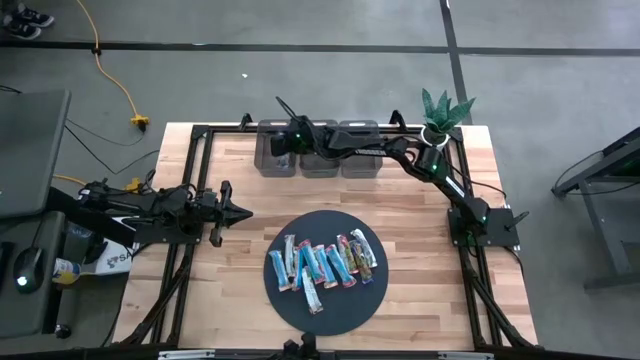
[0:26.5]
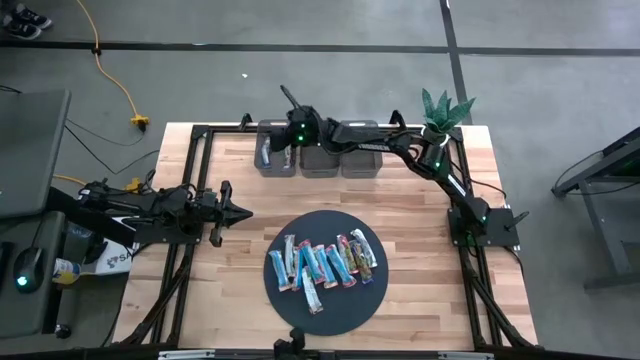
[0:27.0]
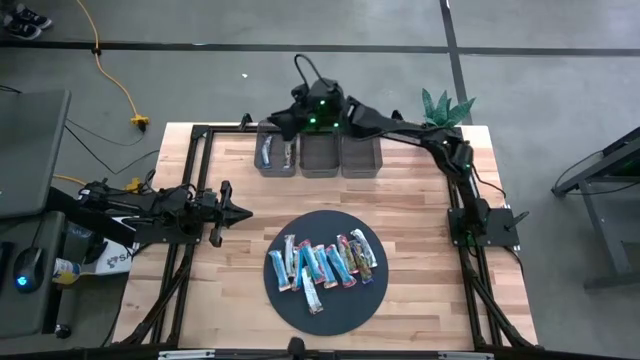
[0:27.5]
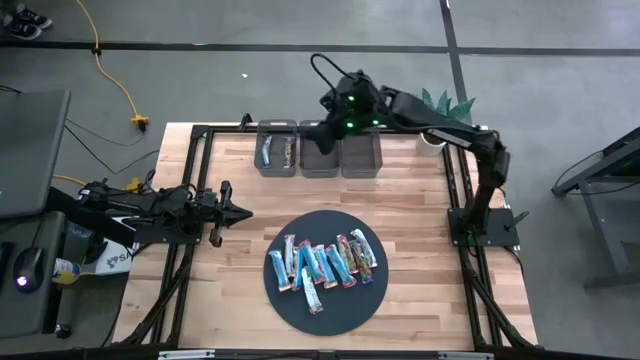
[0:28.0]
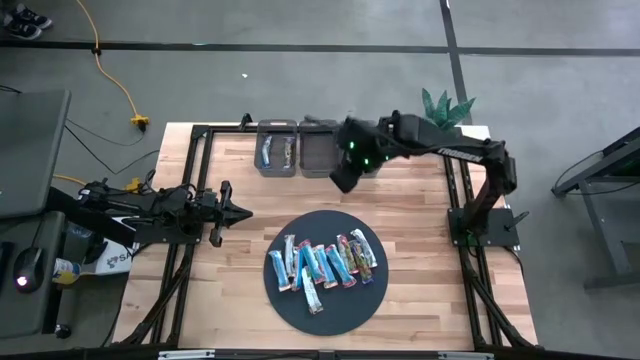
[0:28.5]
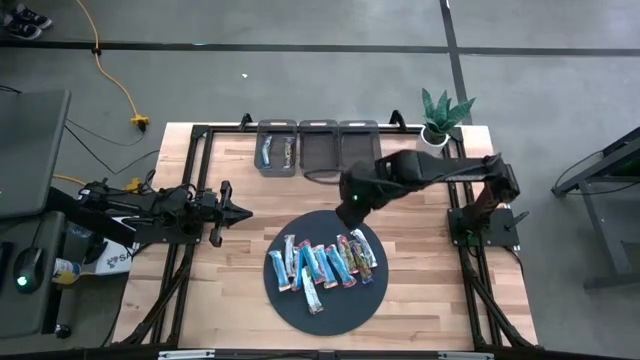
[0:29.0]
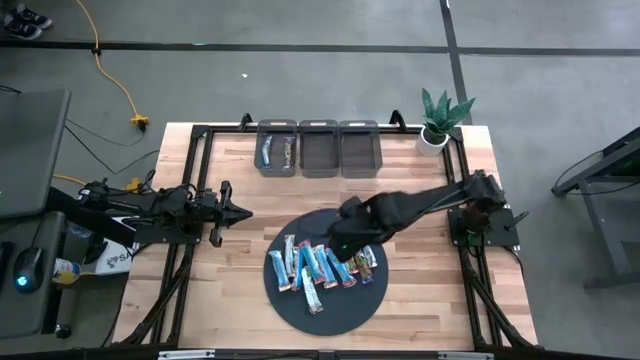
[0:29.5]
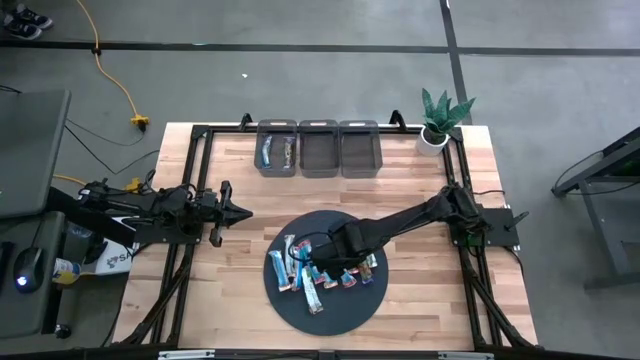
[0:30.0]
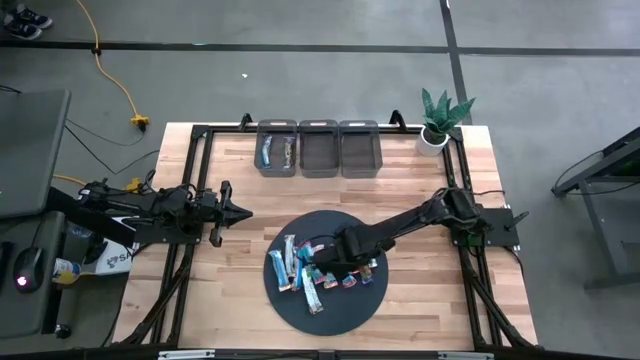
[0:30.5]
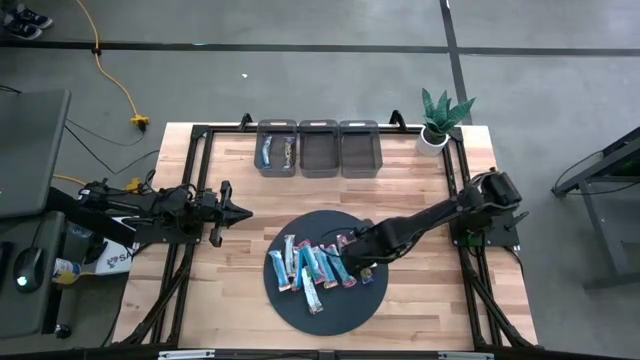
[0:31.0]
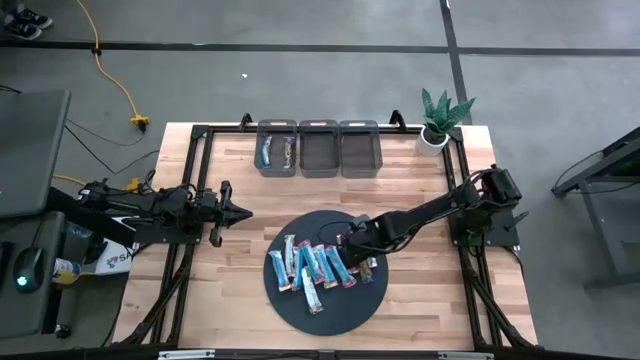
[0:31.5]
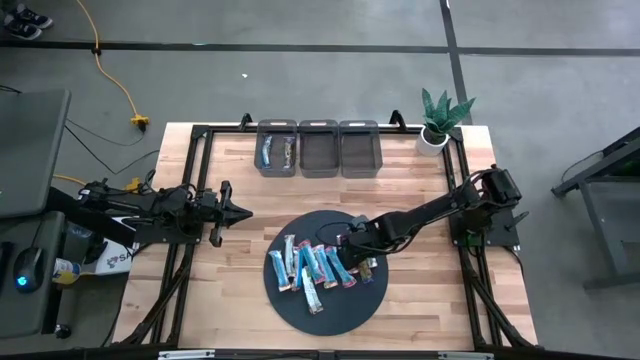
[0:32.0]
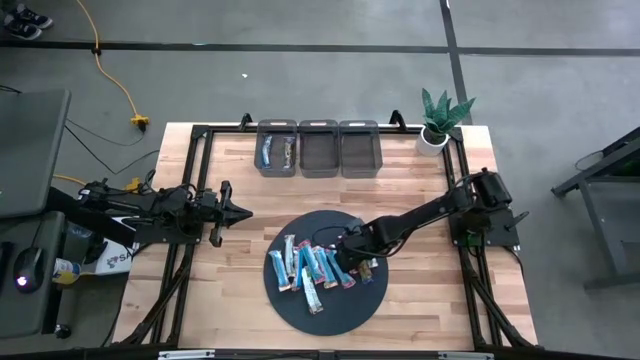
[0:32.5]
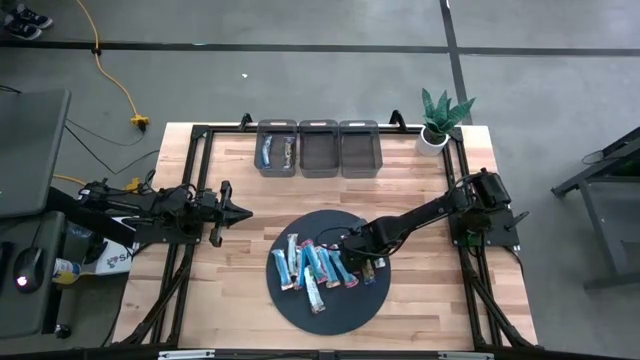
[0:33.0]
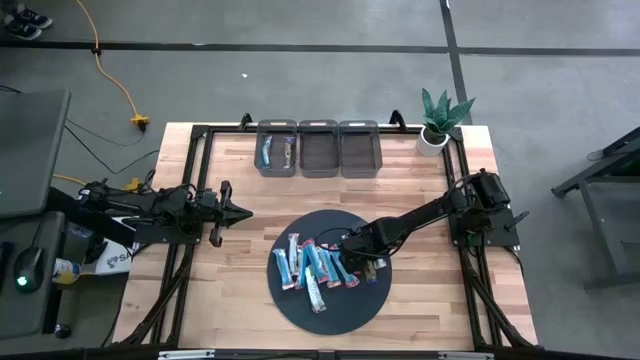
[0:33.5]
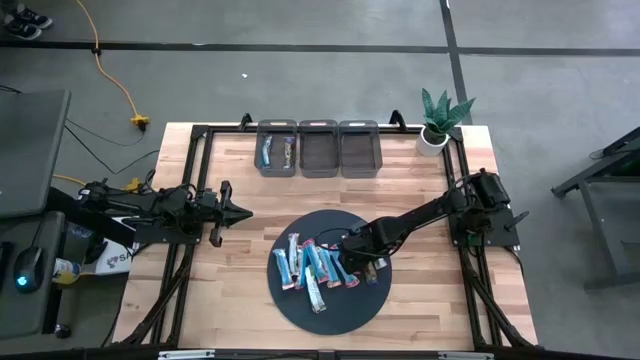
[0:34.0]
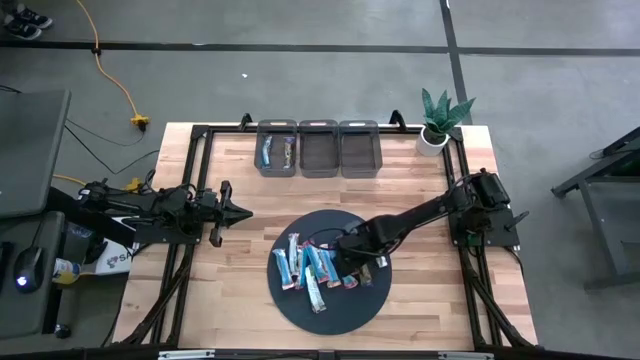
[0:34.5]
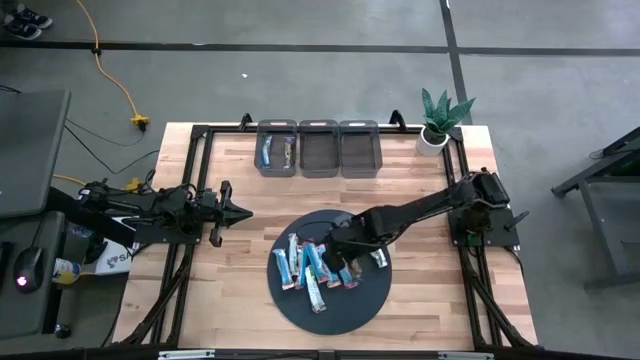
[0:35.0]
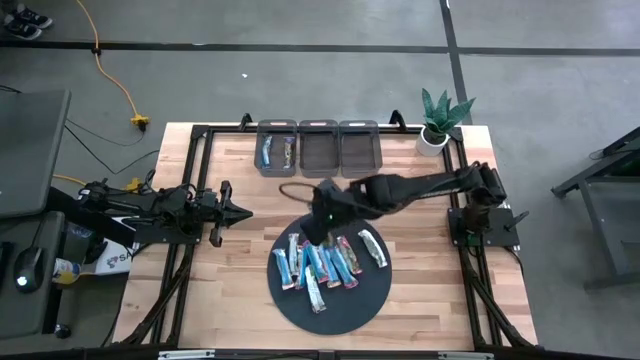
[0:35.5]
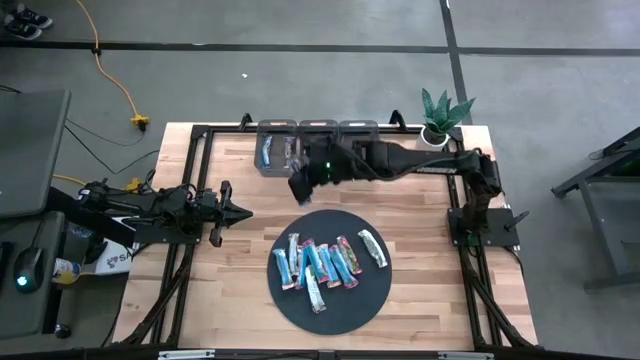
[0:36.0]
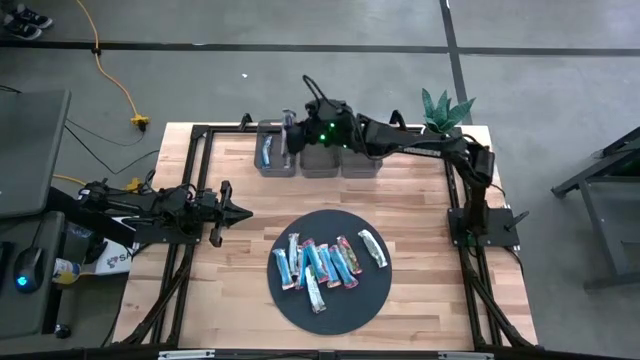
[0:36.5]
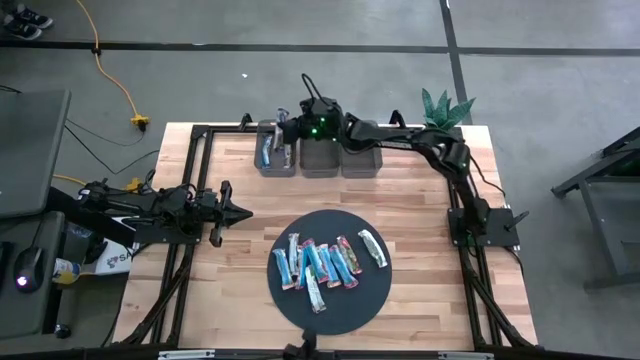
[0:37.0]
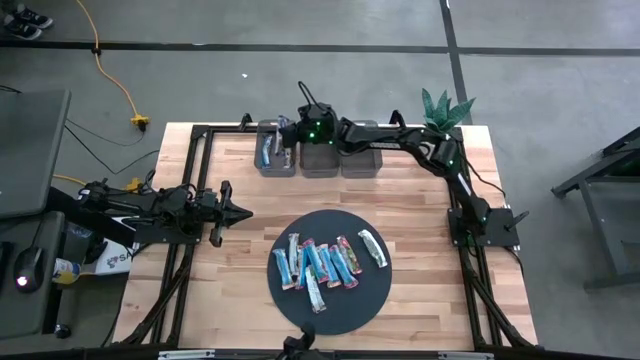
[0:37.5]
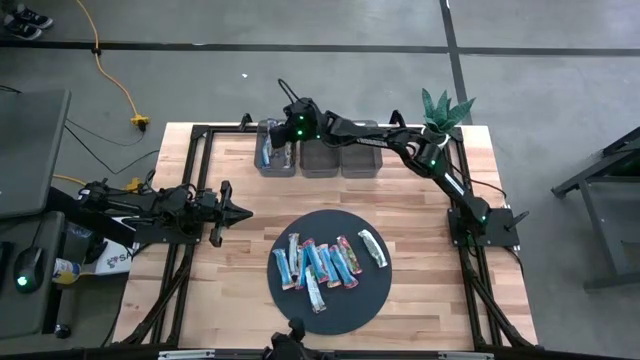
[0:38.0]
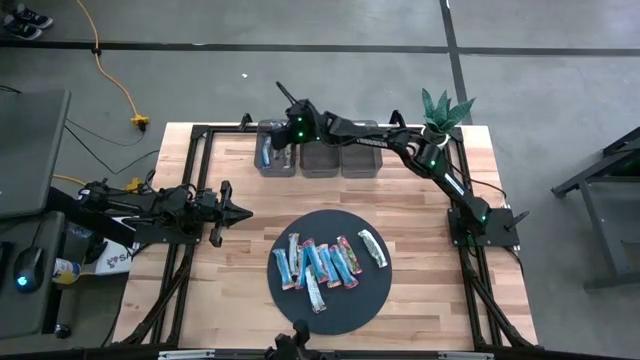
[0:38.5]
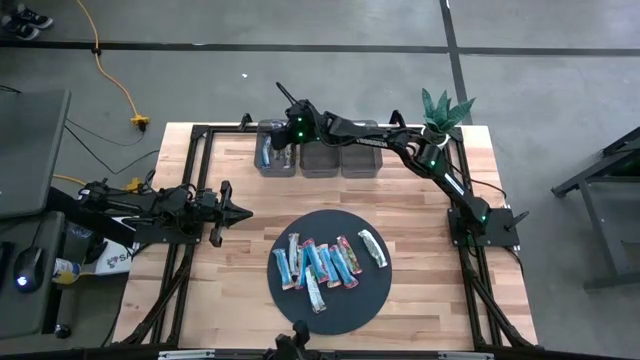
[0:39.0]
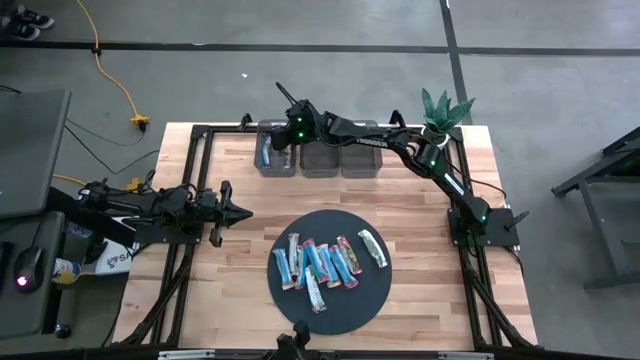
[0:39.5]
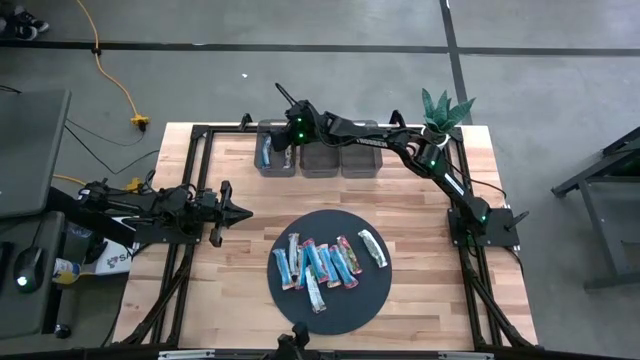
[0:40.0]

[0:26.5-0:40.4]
Task: Pick and place Granola Bars by type
Put the blue granola bar into the left black bin

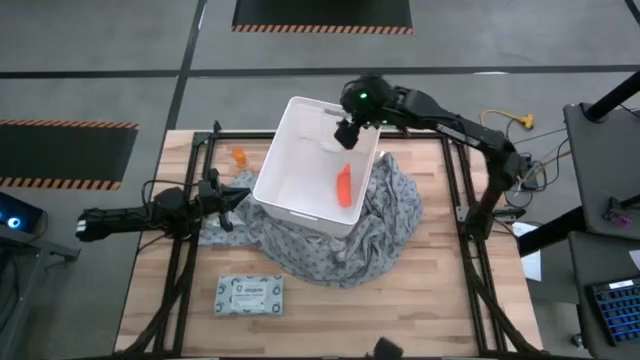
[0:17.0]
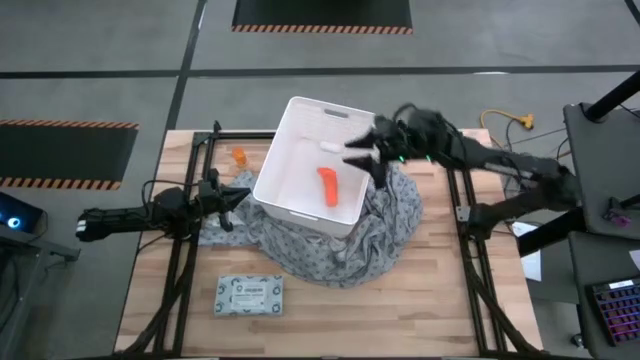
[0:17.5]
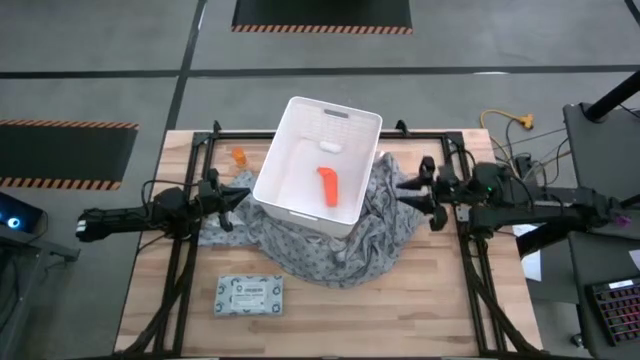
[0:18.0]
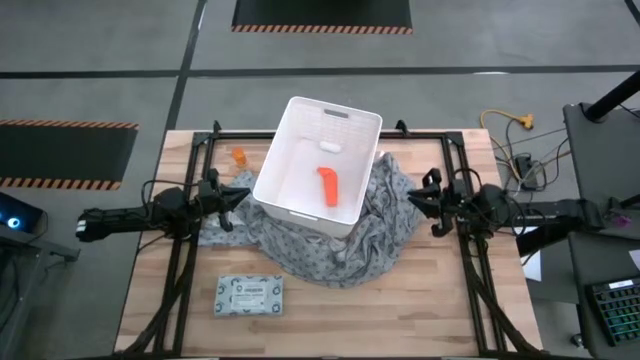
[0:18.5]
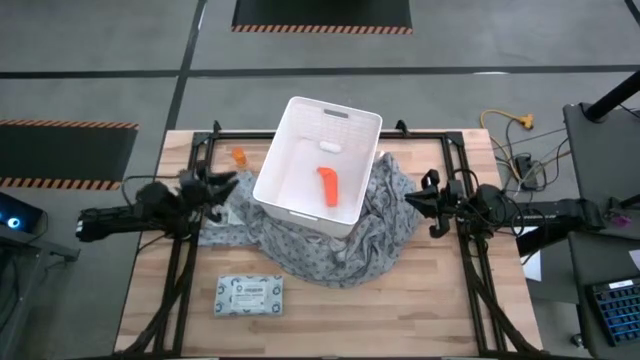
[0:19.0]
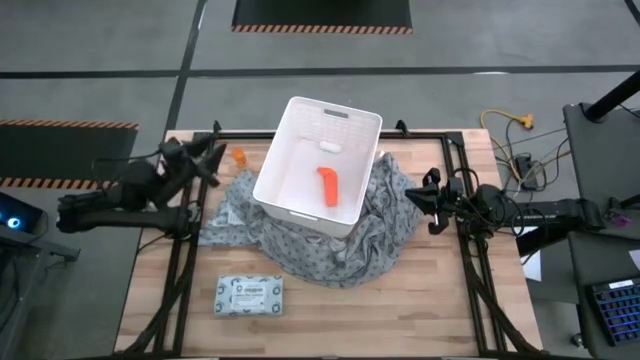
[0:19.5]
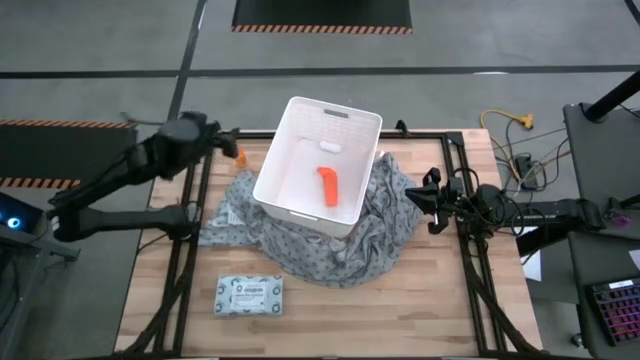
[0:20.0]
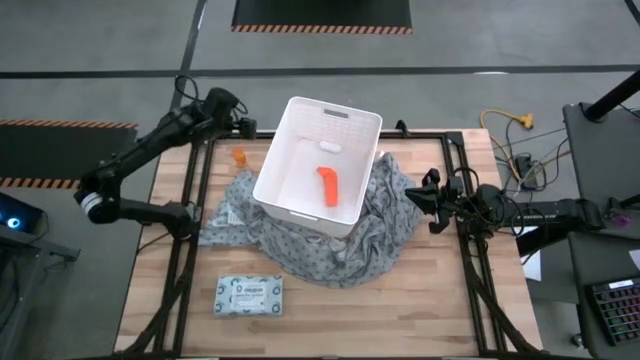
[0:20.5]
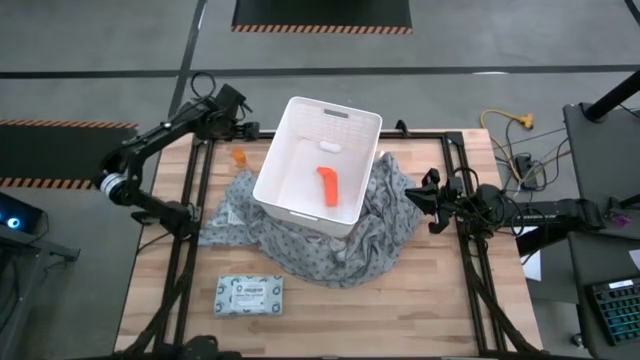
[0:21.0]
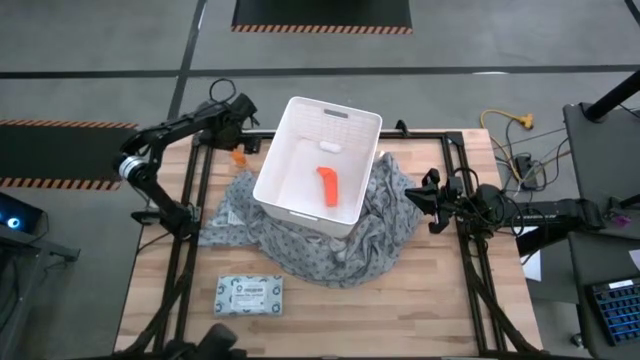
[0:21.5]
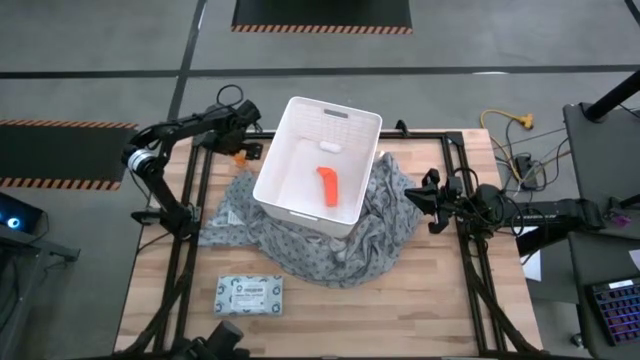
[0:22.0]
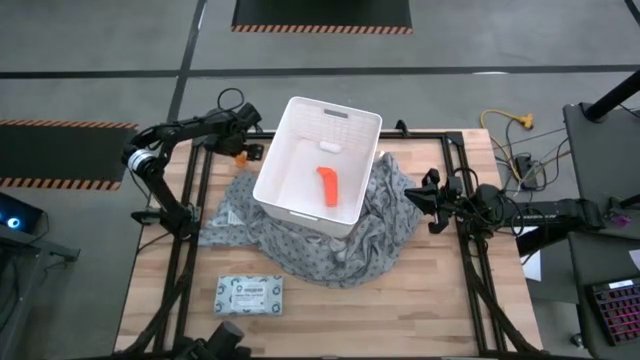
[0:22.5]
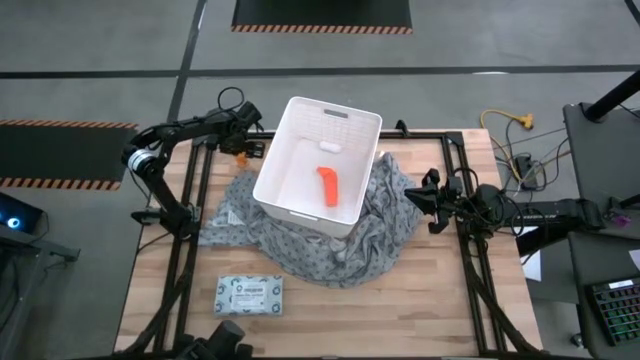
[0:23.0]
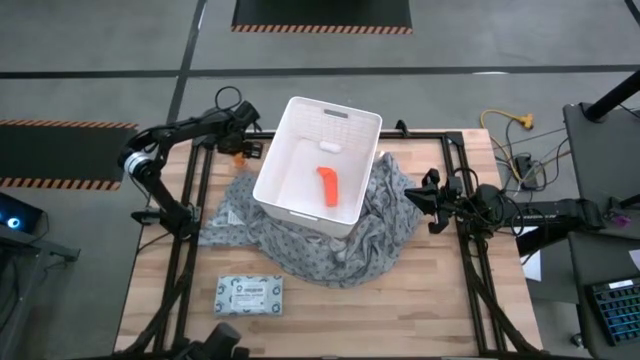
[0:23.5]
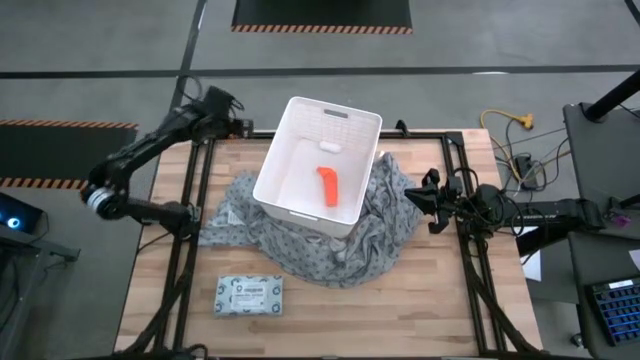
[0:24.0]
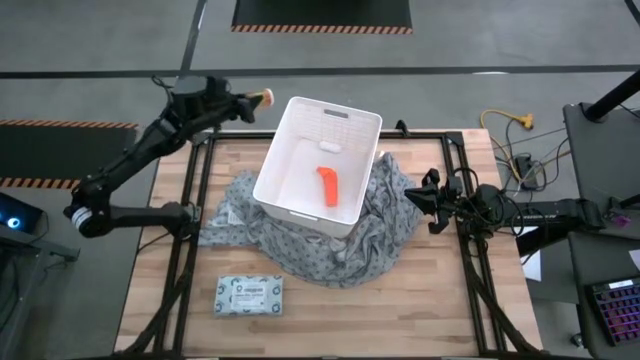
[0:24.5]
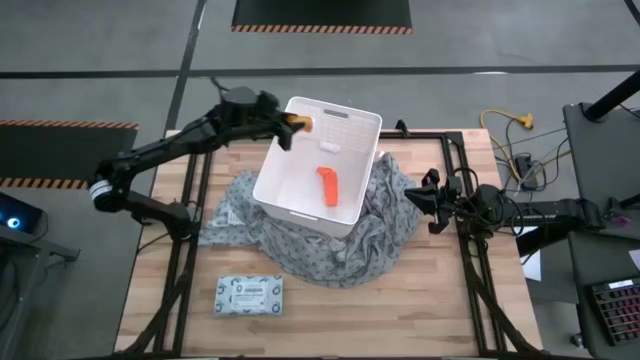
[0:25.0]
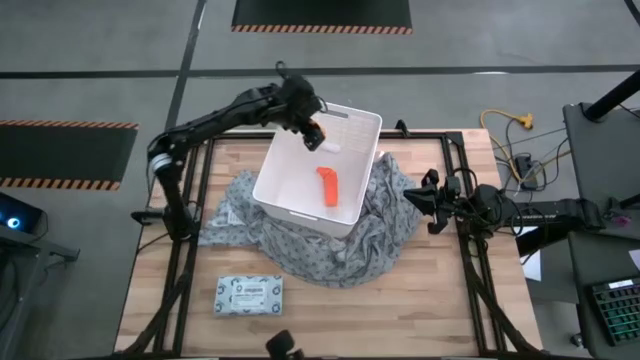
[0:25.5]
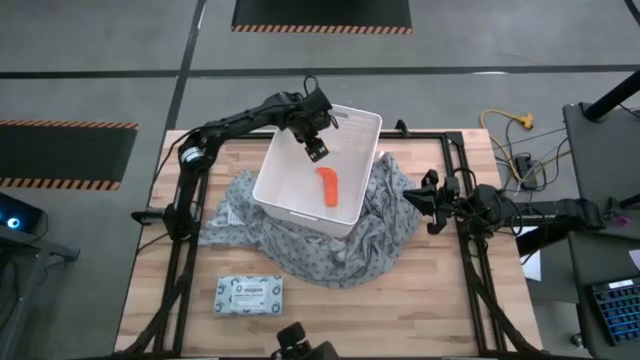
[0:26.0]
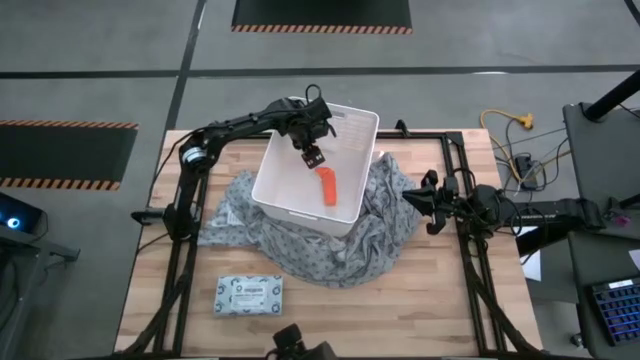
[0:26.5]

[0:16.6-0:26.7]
Task: Pick & place medical supplies in basket/bin
Put the orange pill bottle into the white bin
